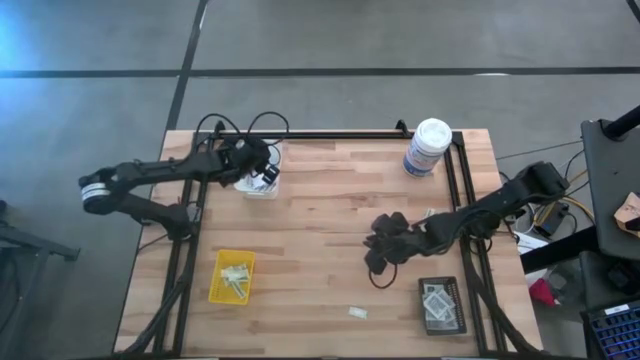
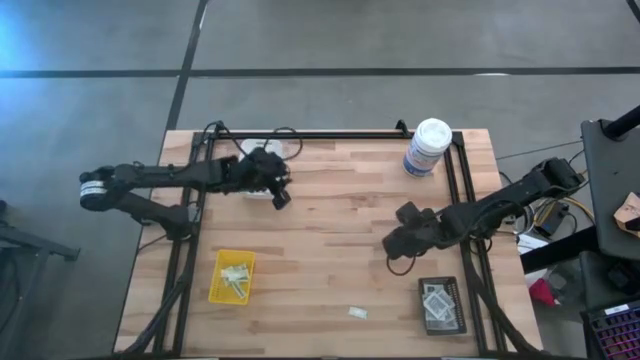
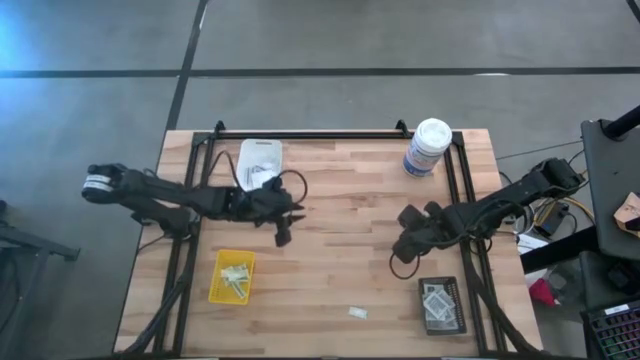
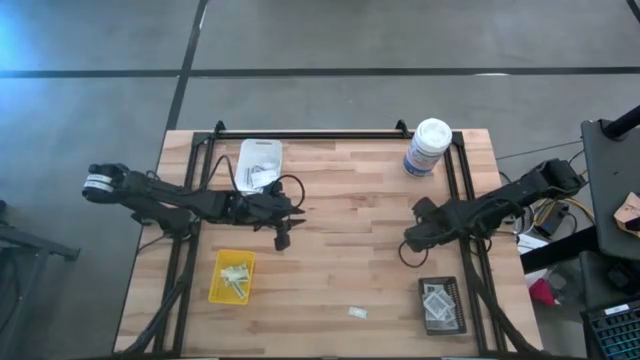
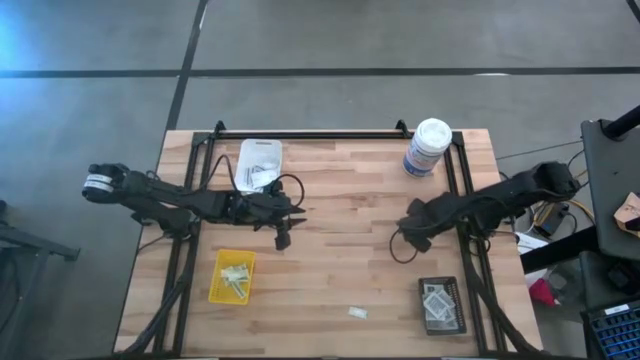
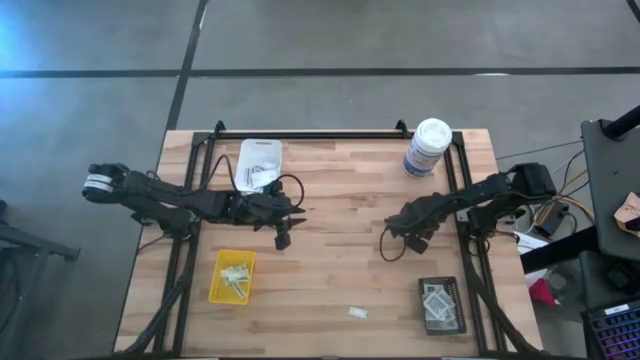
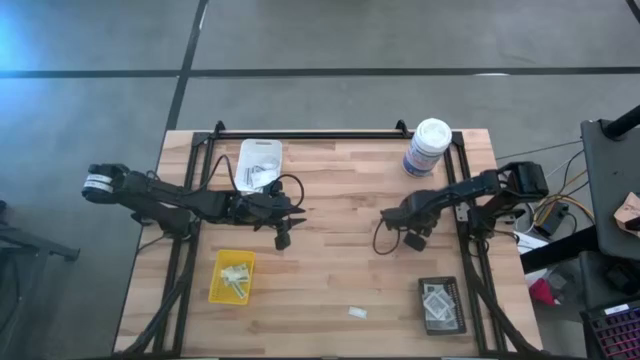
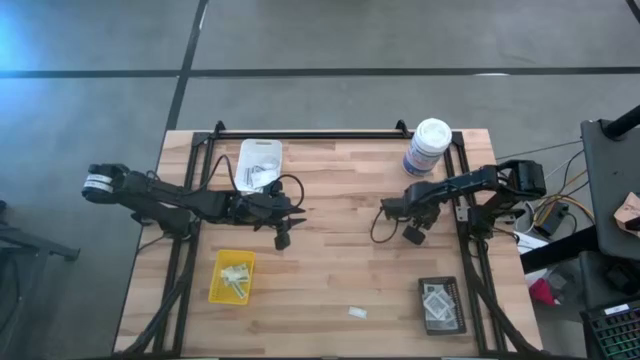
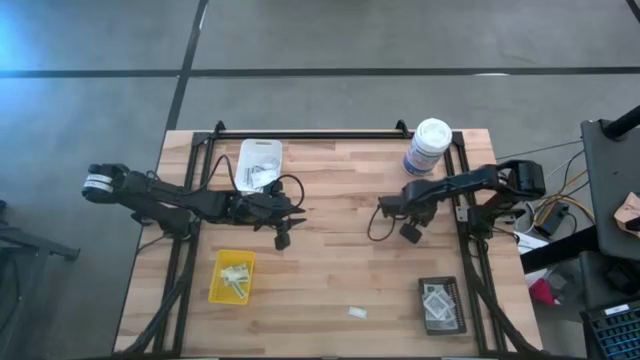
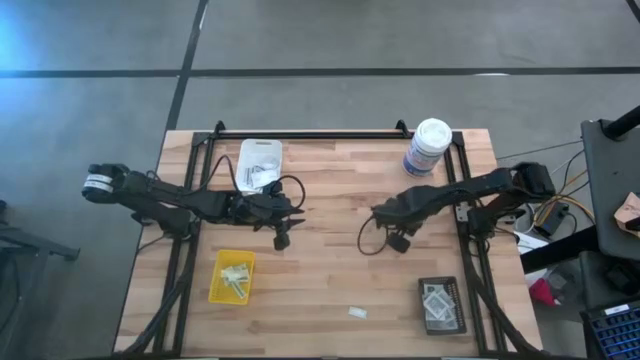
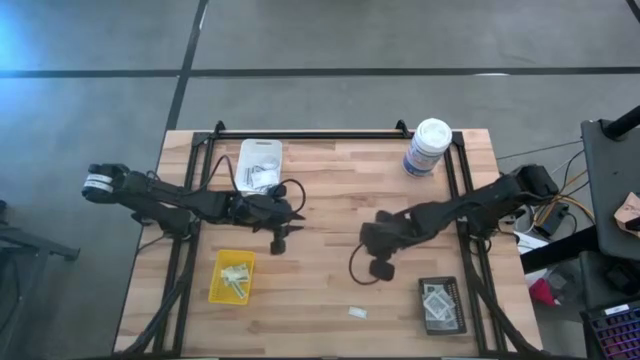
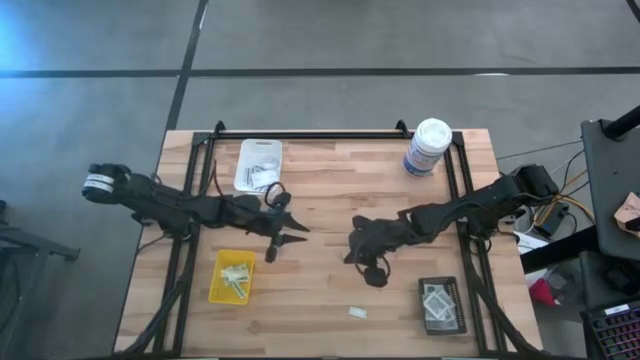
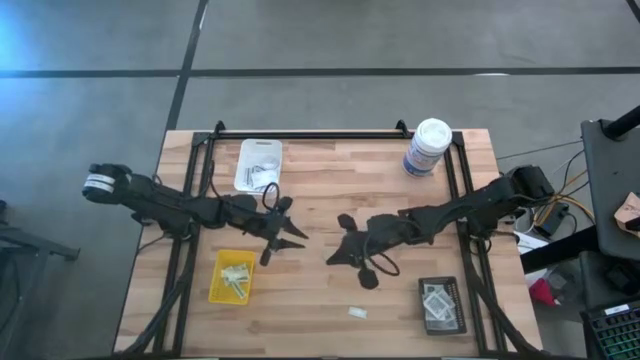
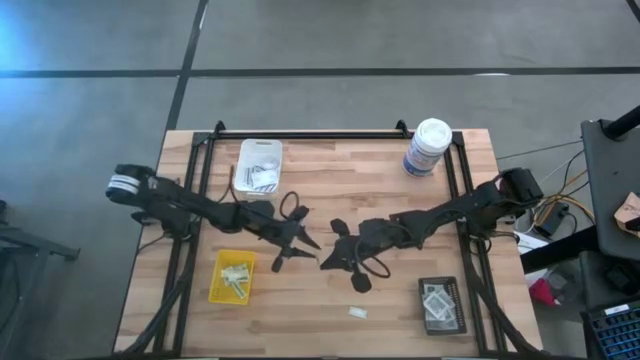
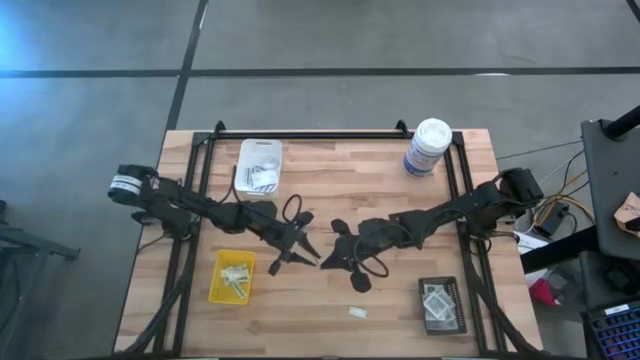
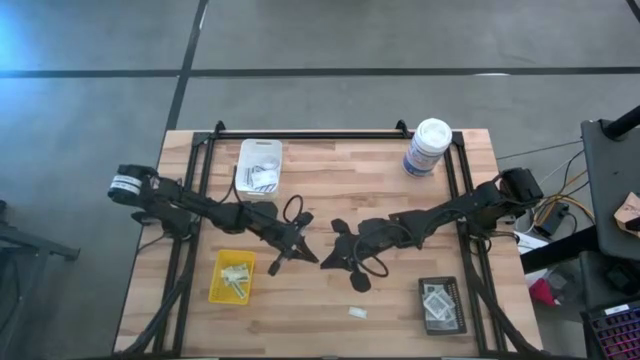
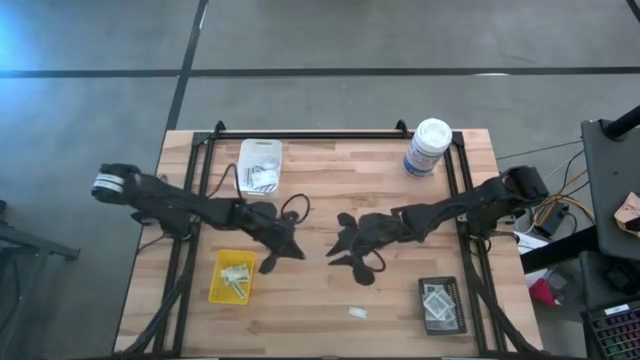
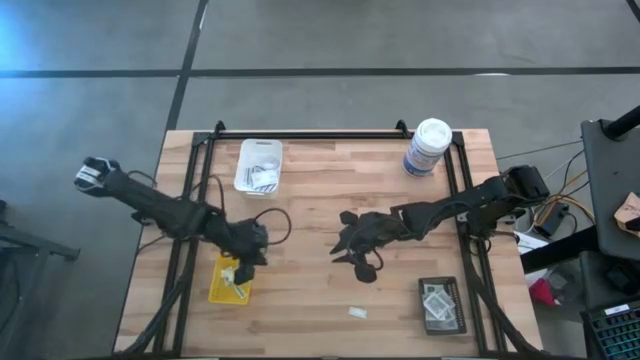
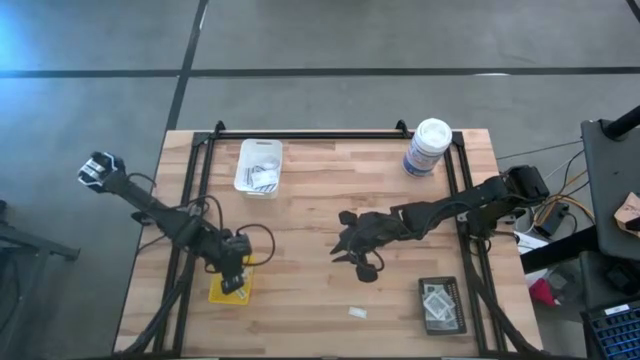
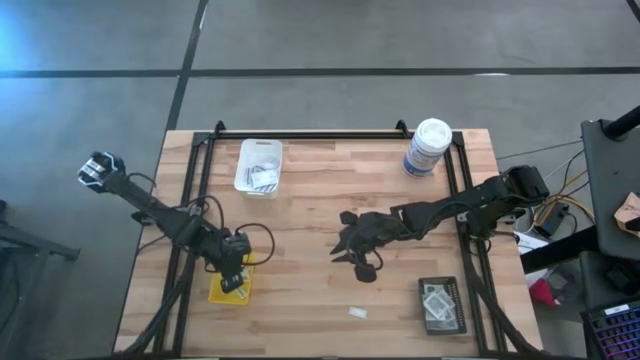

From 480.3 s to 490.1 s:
Task: Pick & Place First Aid Supplies
Put the green bandage into the yellow bin

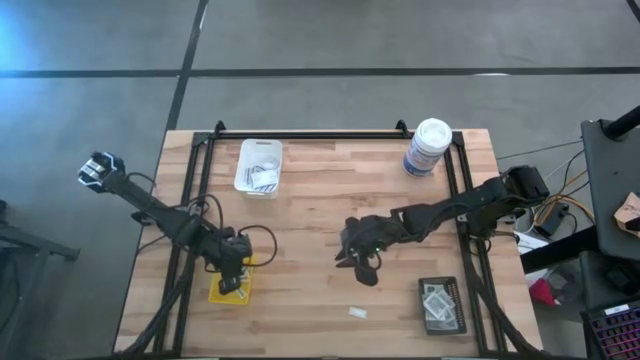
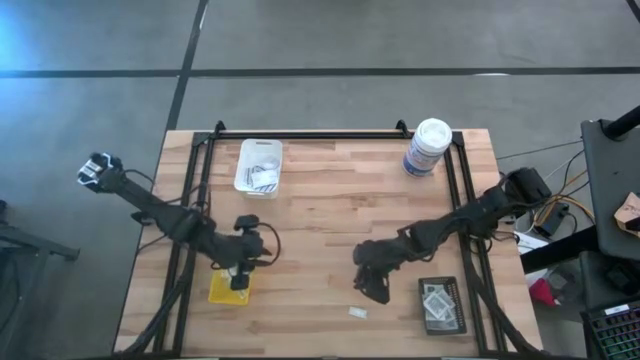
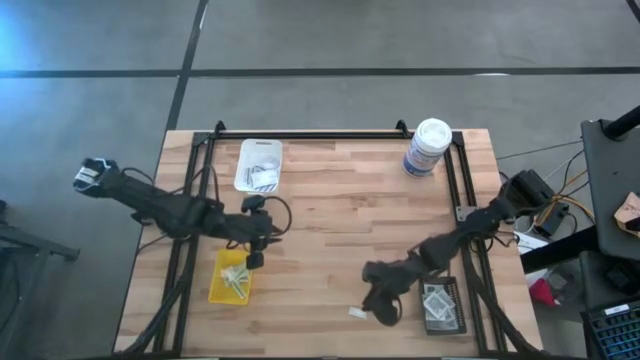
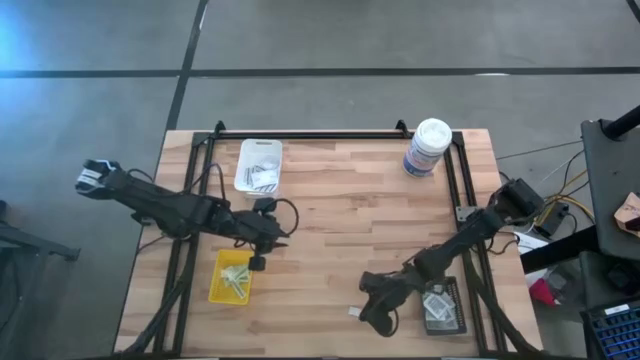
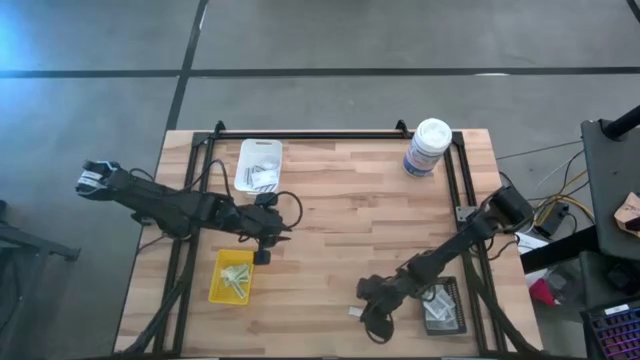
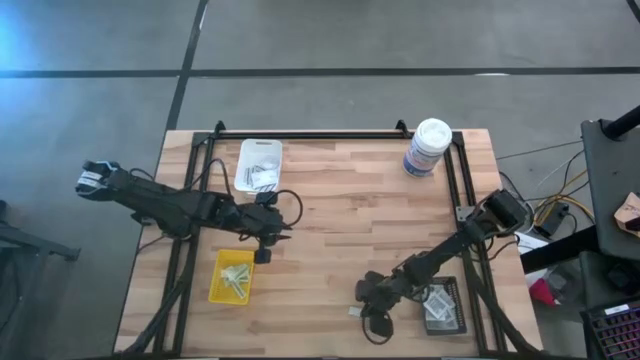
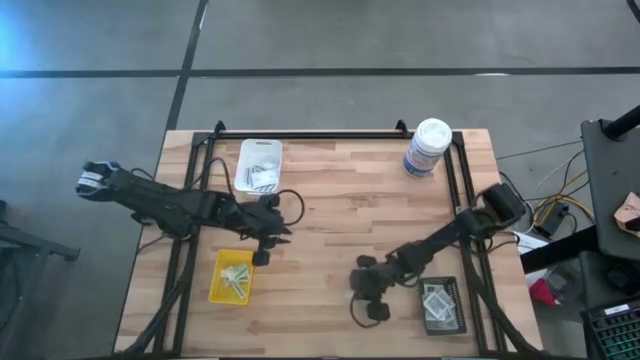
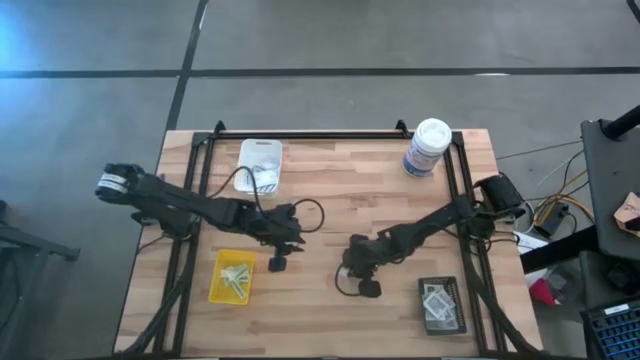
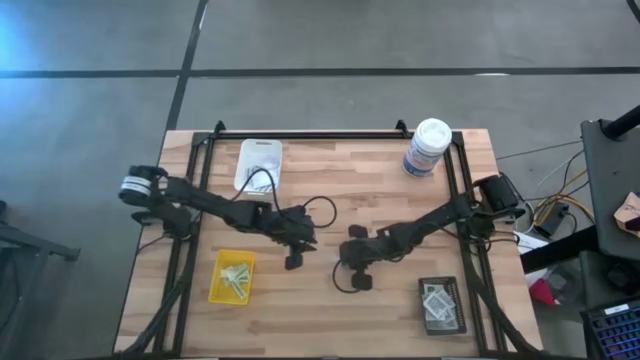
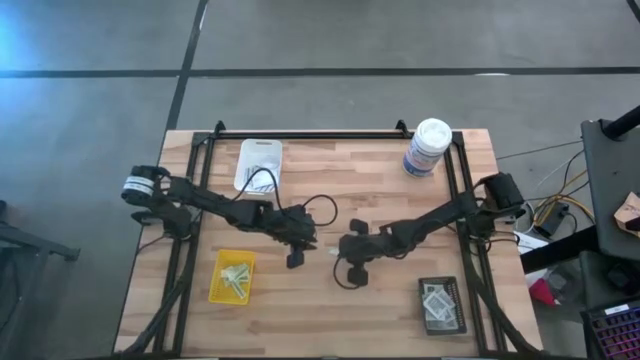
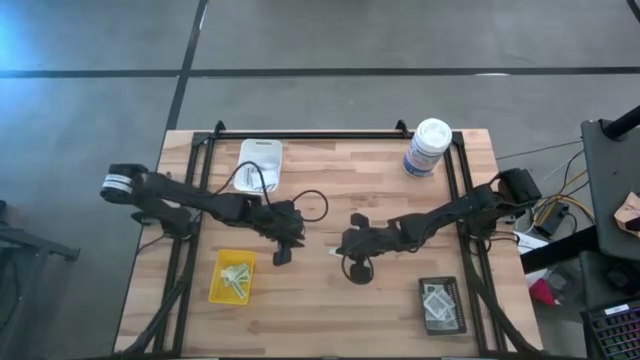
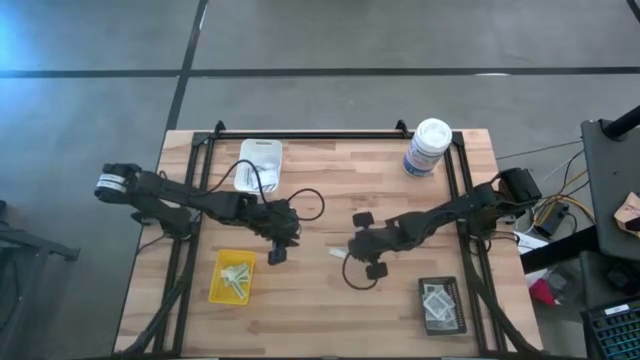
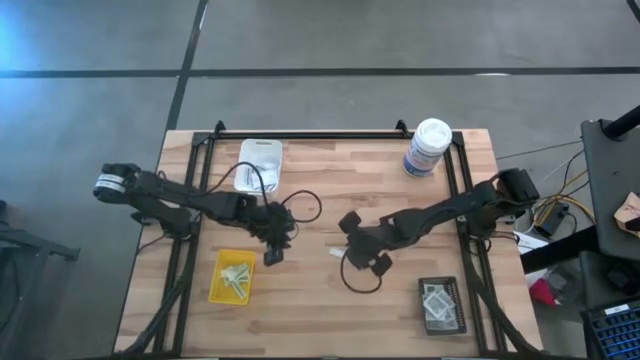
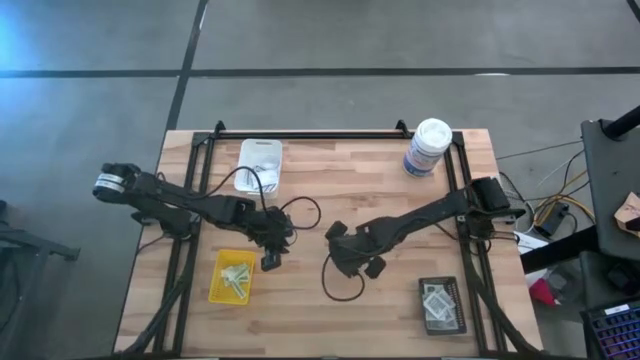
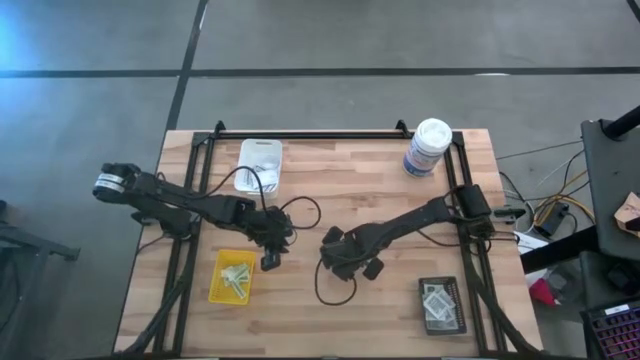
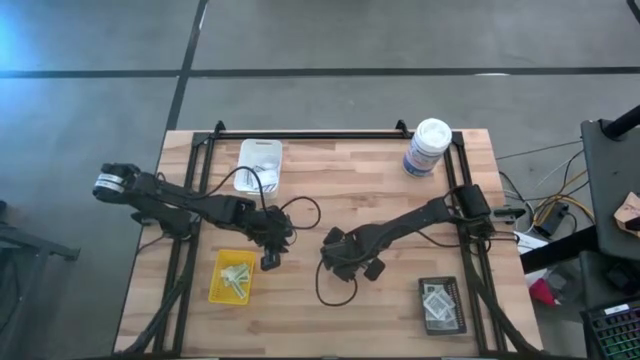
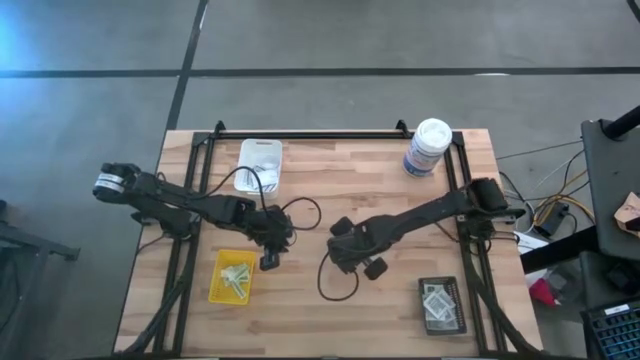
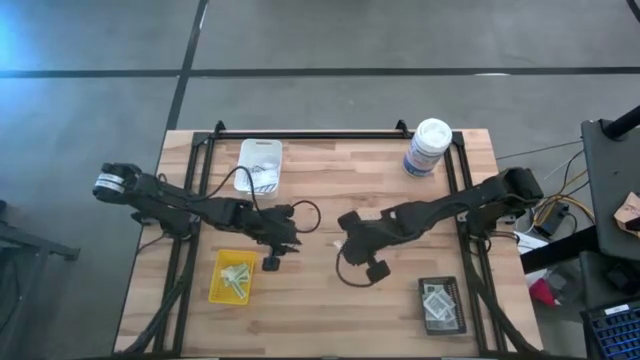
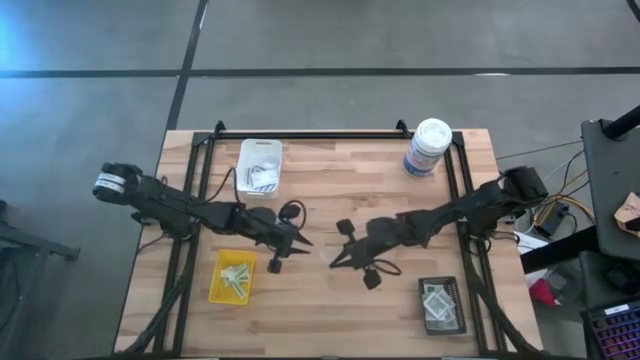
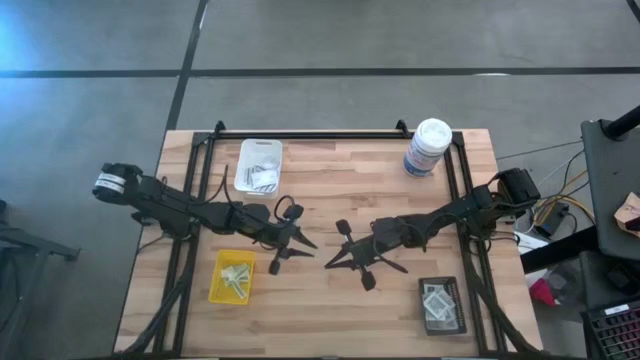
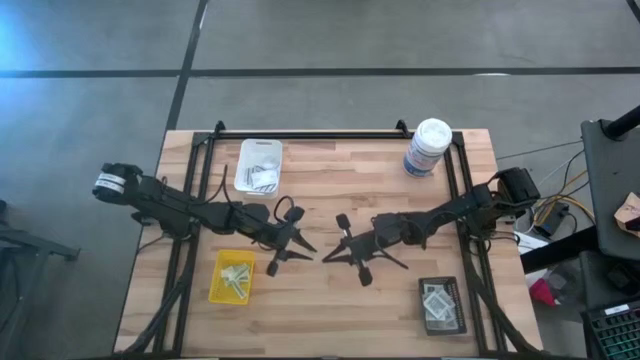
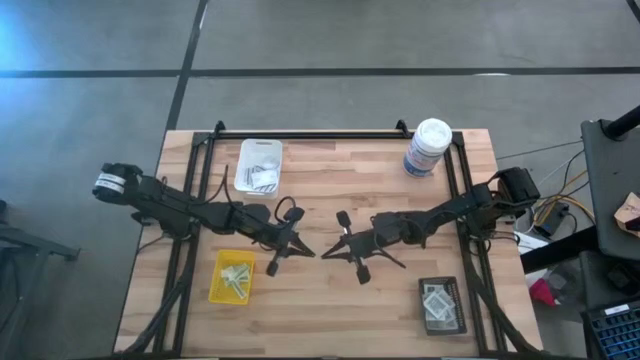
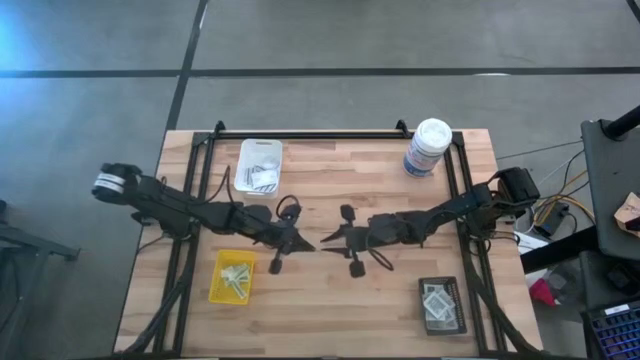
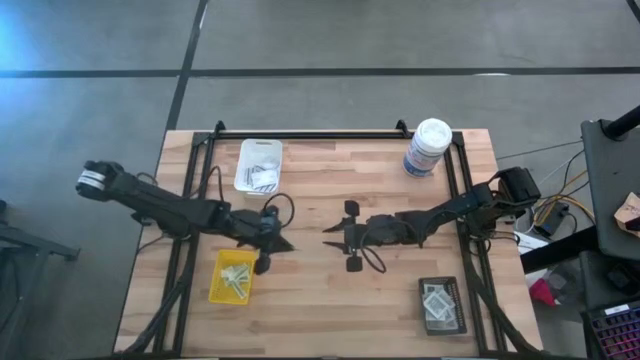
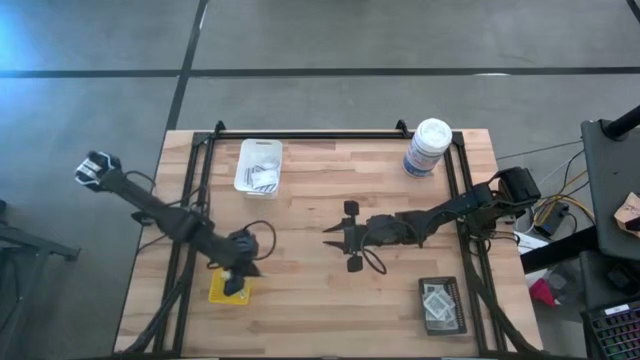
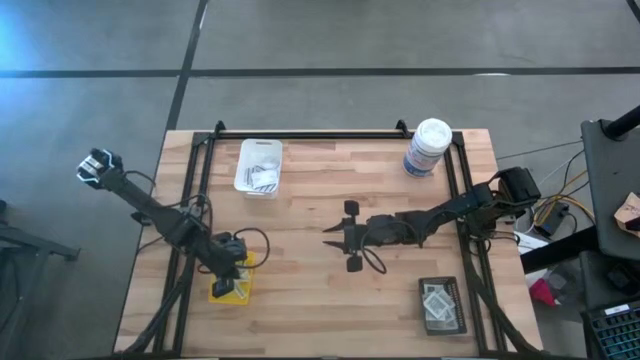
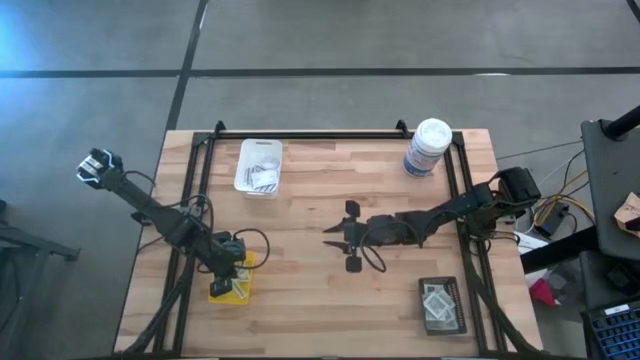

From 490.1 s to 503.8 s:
Put the green bandage into the yellow bin
